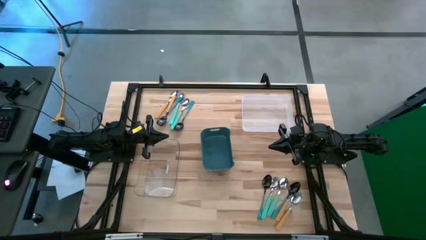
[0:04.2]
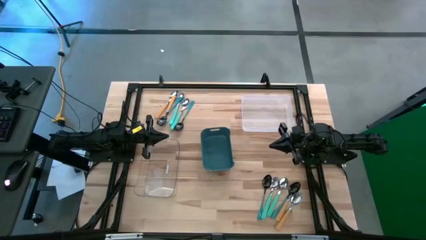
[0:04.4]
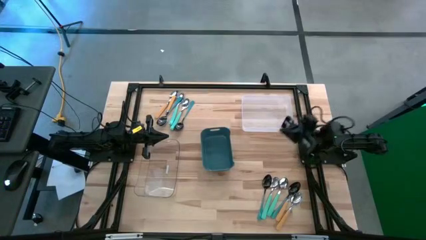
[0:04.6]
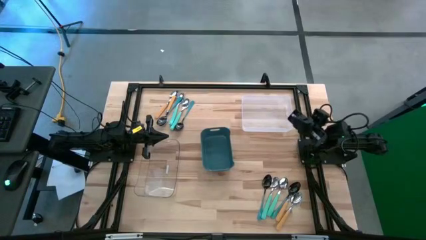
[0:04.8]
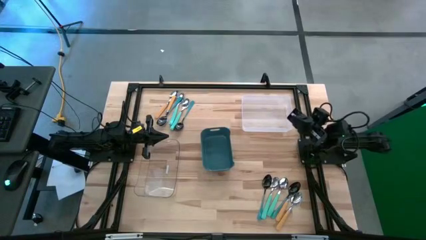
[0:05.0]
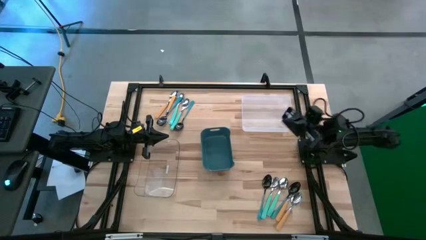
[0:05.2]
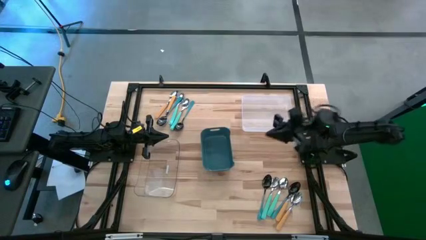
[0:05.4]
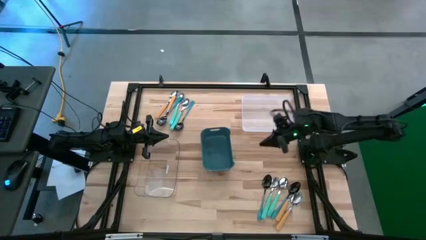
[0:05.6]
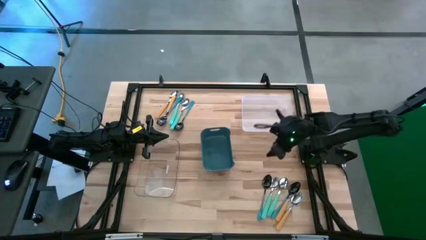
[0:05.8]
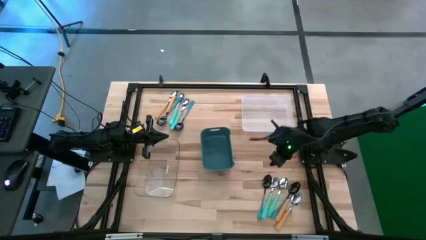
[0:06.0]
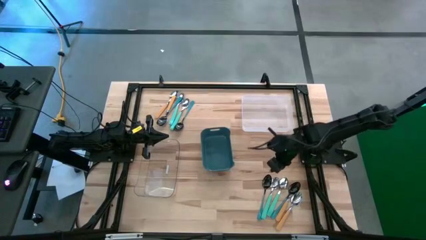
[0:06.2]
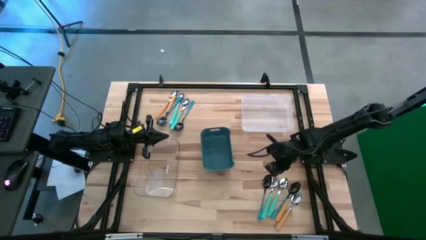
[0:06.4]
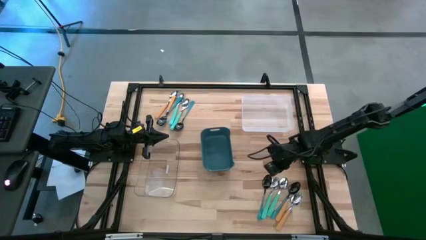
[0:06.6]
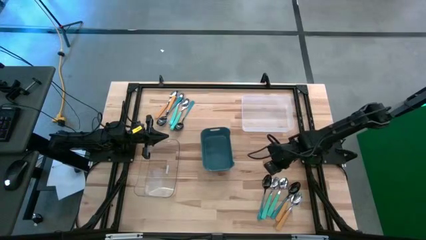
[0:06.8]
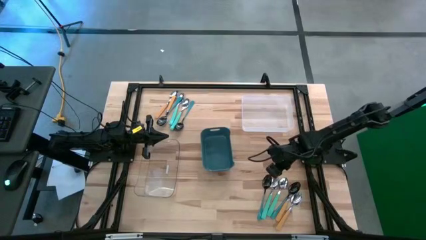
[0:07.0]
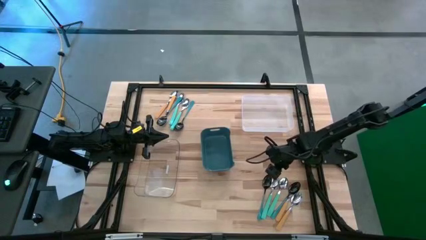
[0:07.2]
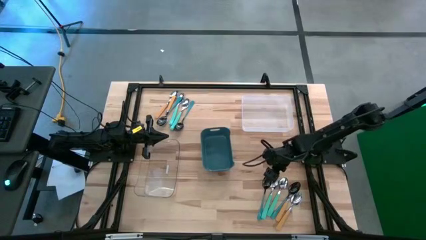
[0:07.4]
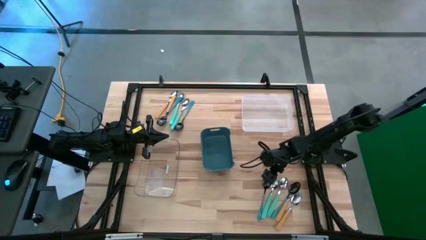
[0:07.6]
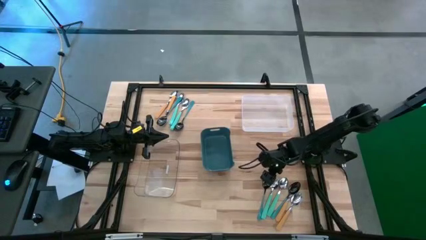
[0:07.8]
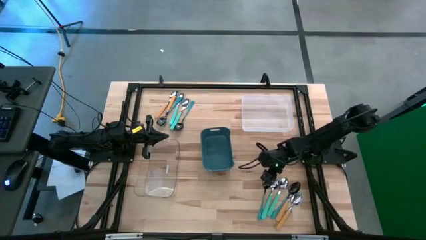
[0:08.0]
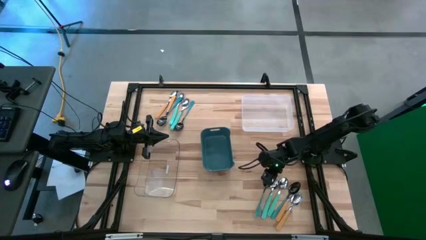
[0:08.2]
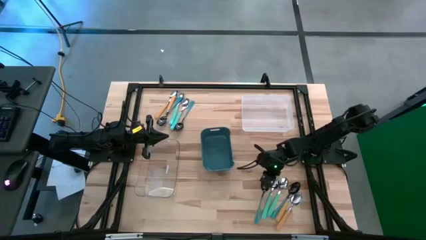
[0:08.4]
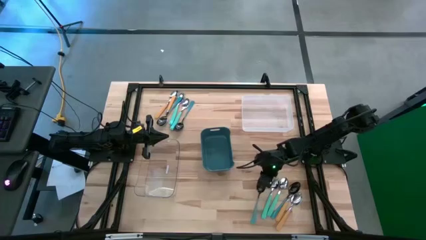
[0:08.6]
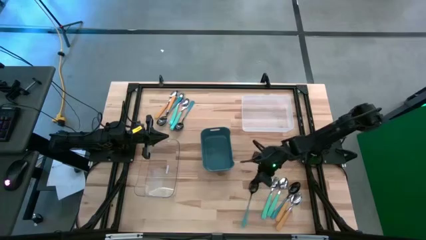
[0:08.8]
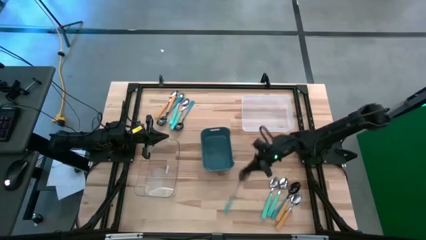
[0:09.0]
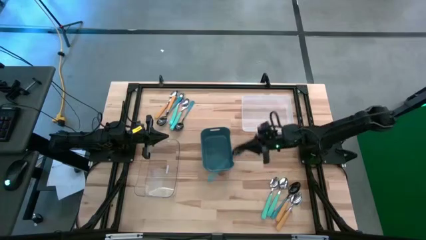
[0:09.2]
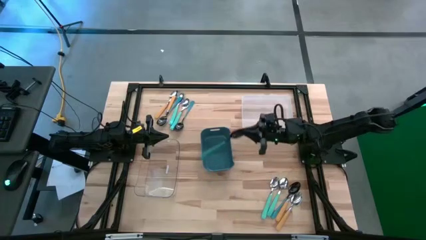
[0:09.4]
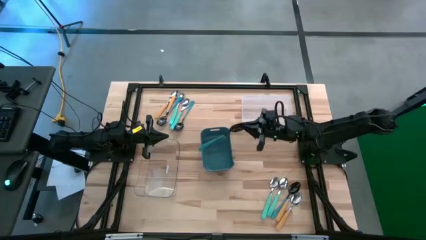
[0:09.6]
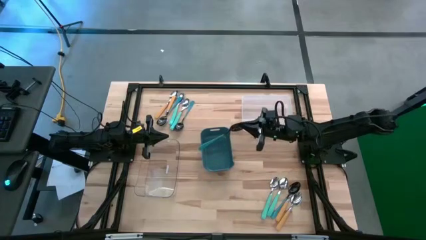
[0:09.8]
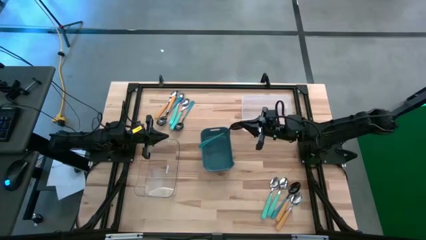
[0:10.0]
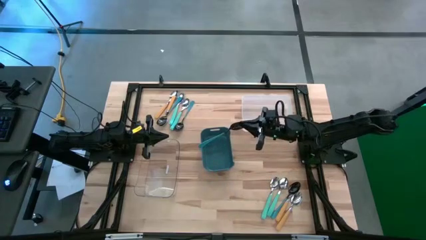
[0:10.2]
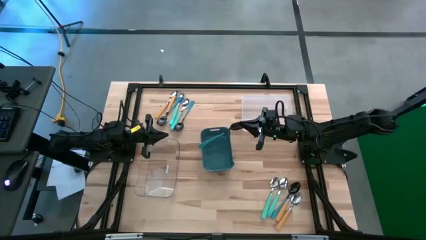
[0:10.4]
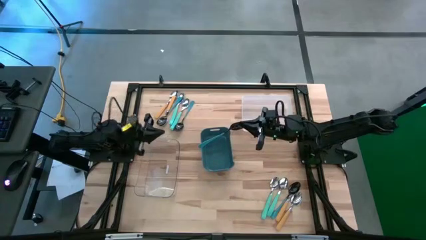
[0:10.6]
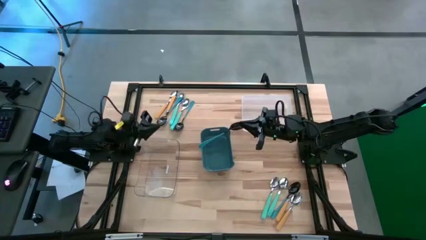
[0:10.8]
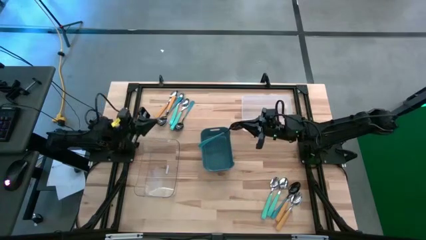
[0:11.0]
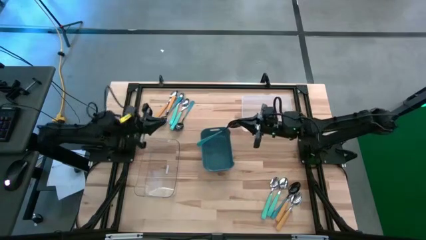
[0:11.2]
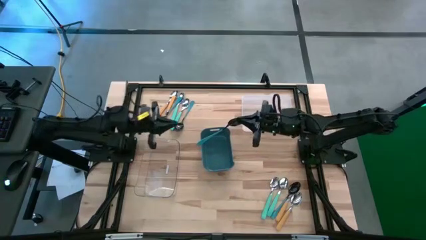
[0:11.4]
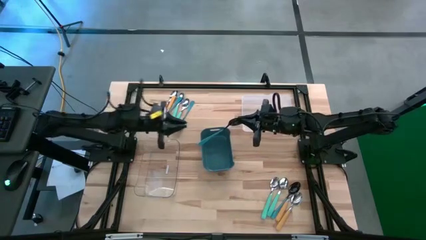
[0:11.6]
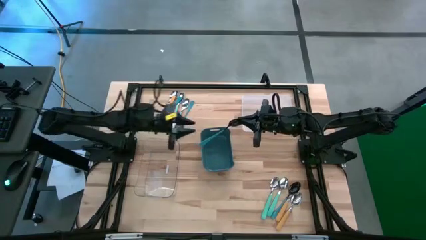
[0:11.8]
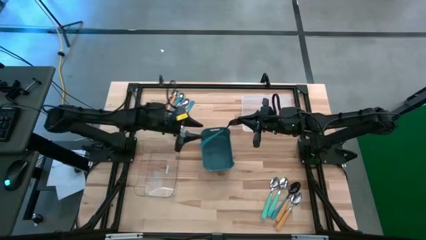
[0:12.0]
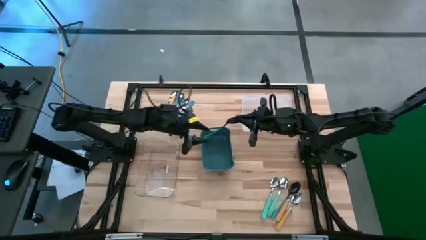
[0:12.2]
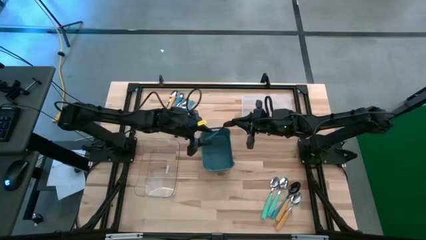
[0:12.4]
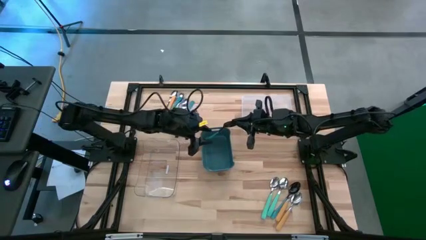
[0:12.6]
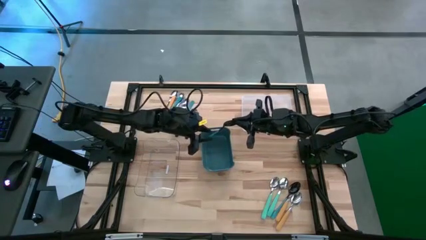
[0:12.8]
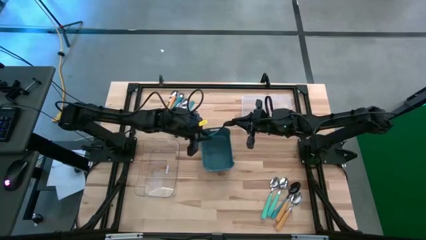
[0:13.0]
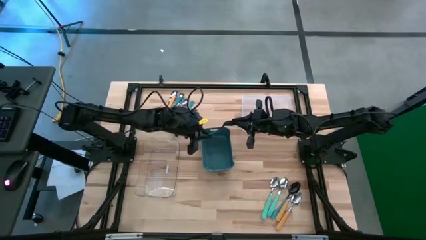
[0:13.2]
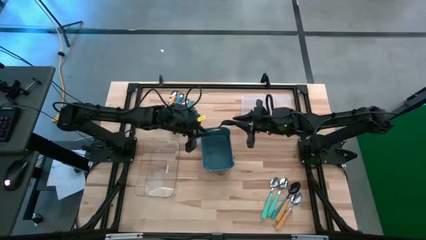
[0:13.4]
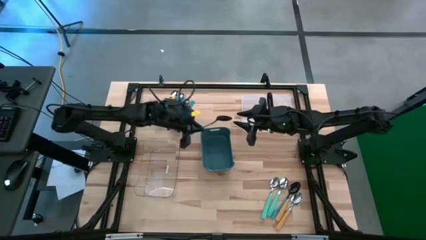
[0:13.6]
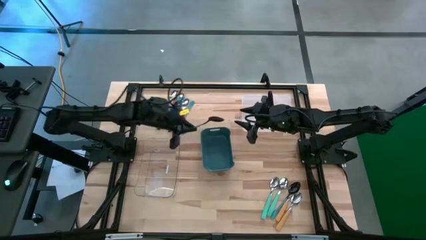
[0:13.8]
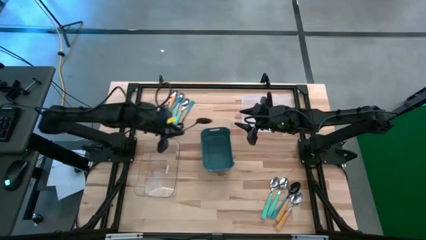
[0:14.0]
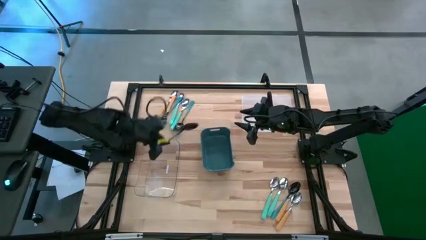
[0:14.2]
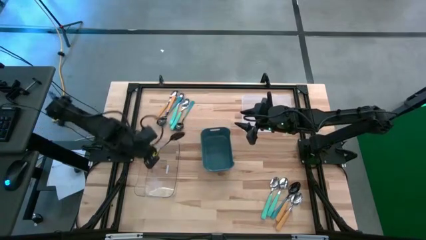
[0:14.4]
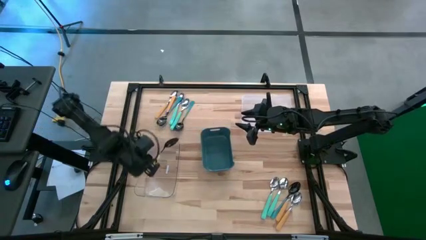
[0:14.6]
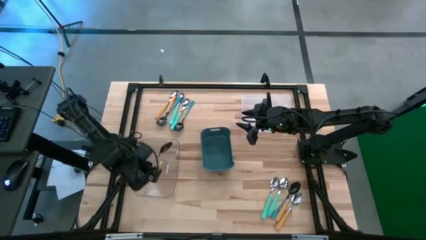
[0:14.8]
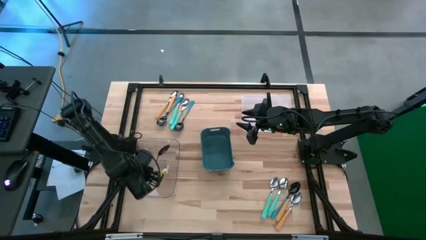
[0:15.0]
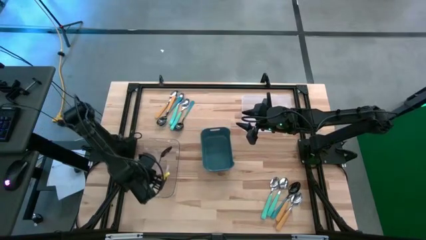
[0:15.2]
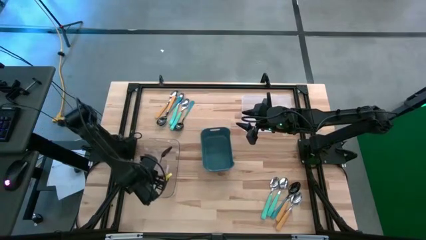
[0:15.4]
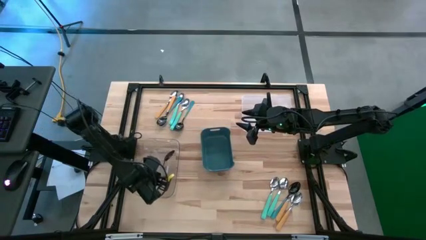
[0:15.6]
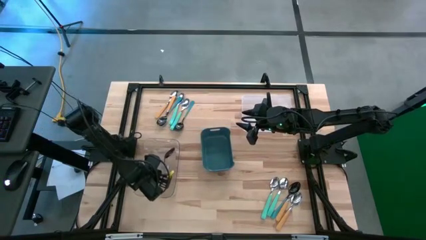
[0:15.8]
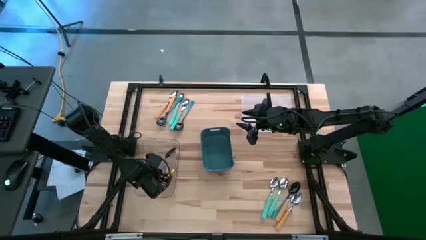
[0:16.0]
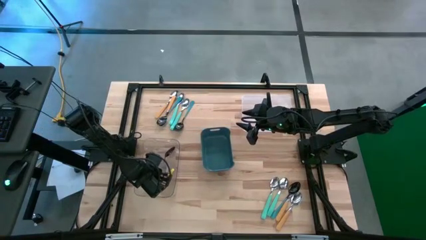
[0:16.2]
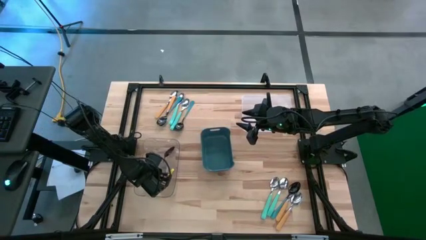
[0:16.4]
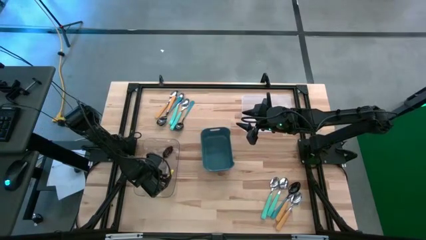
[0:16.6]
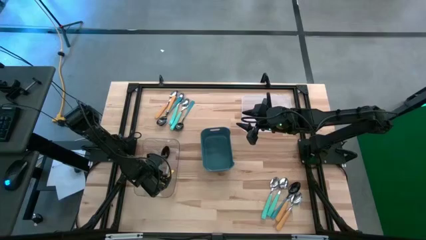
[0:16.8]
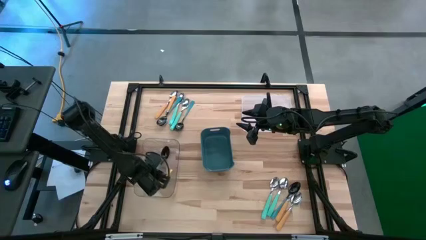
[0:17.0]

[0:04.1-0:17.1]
Task: Sort silverware by color (type)
Put the blue spoon into the transparent bin

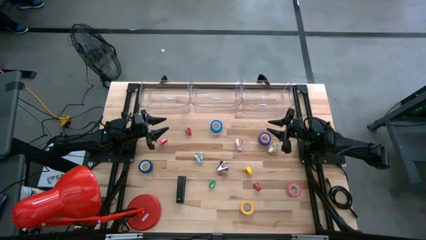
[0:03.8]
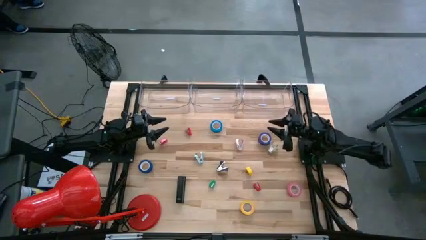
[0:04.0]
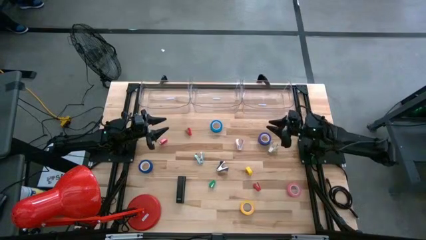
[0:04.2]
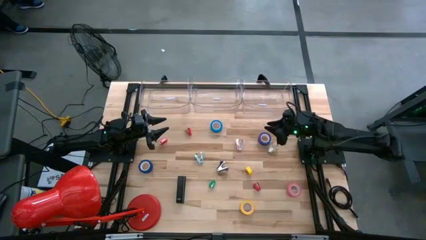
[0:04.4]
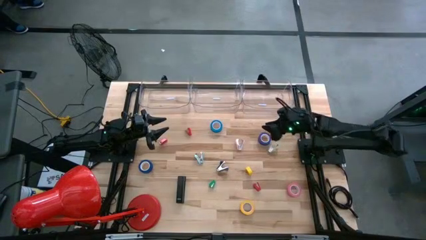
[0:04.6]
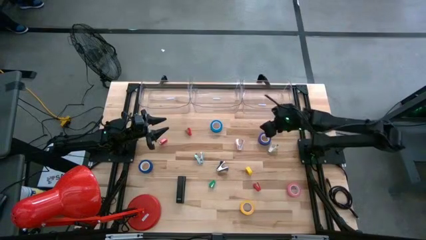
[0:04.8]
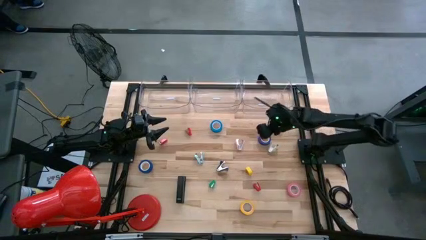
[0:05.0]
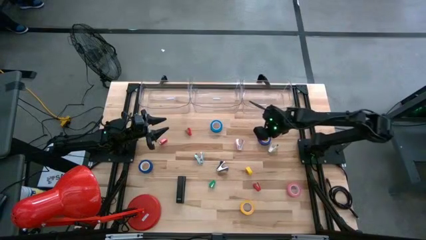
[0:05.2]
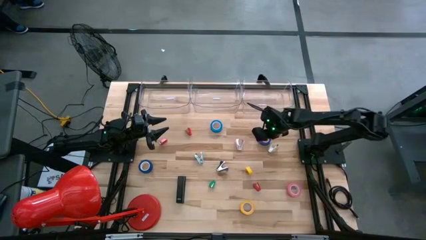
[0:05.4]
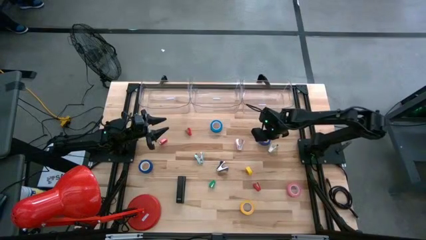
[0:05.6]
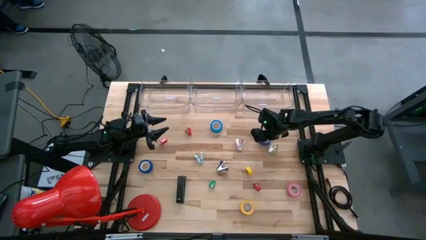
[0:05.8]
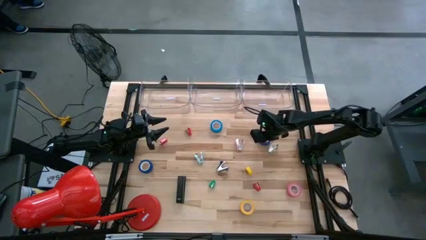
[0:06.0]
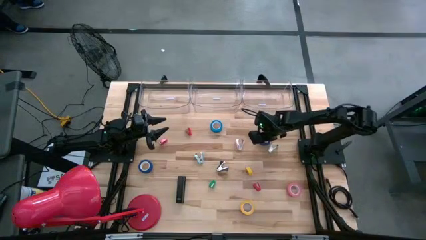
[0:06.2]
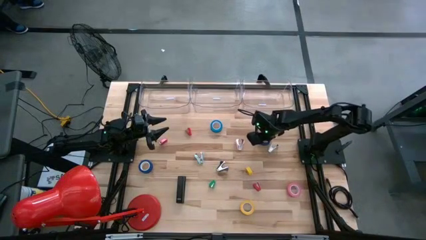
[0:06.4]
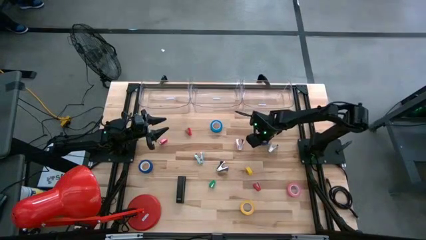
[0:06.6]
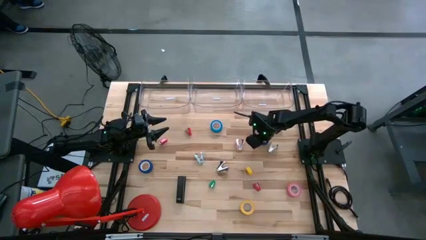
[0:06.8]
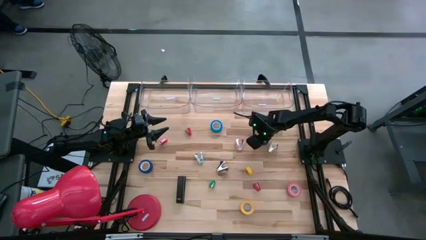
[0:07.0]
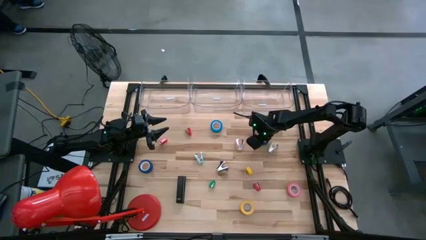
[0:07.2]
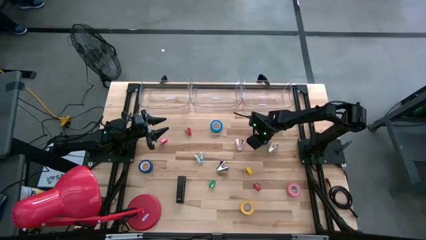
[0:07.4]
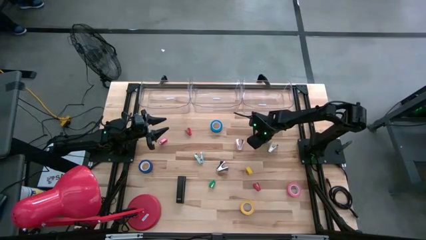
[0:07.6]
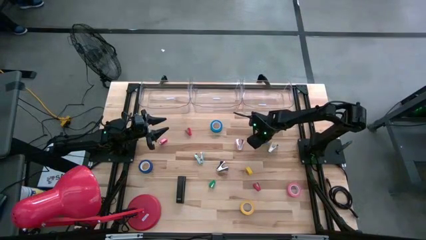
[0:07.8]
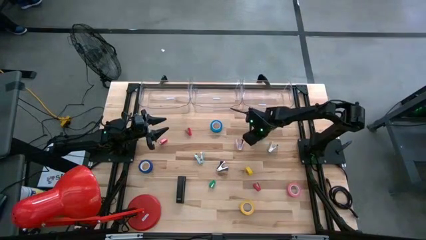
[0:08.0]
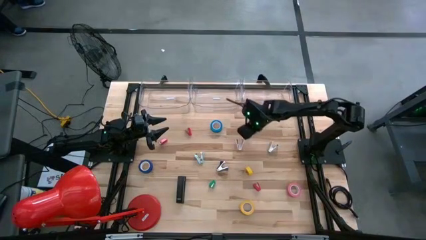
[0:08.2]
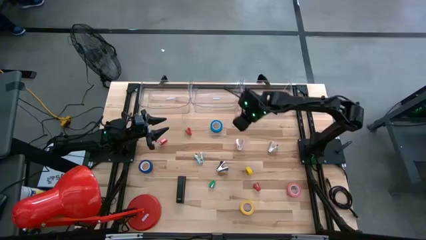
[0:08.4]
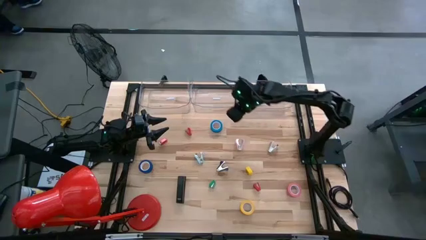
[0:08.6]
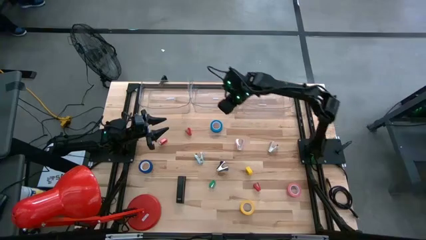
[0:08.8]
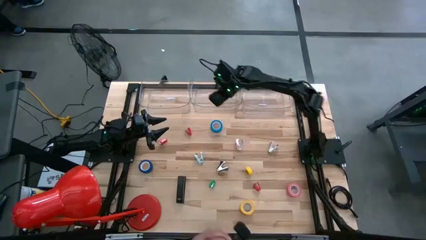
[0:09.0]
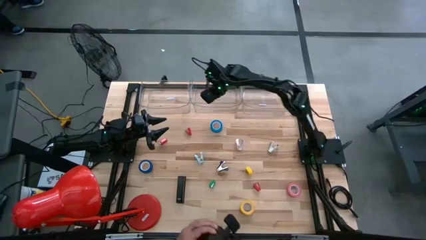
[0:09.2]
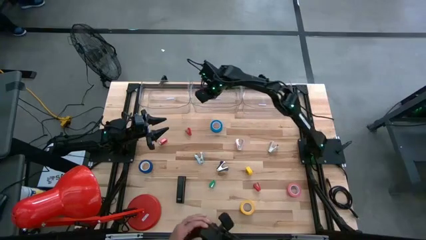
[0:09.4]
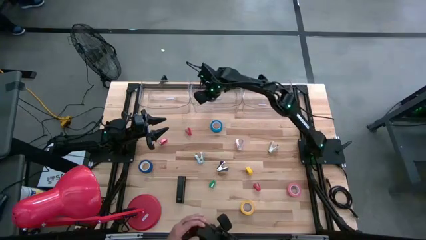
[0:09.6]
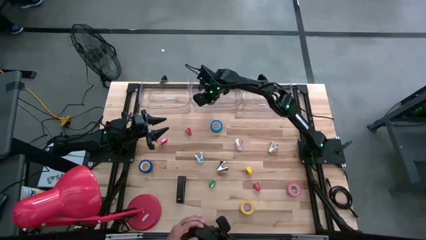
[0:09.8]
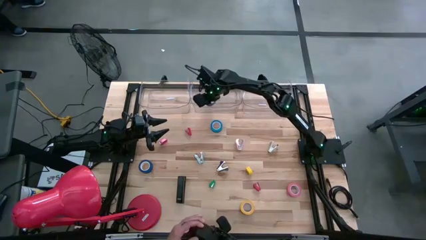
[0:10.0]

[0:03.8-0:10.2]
Task: Pick and place Stapler, Stapler remover, tape
Put the dark blue tape into the middle transparent bin
